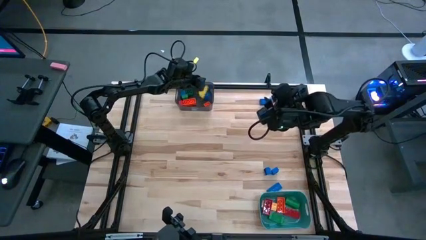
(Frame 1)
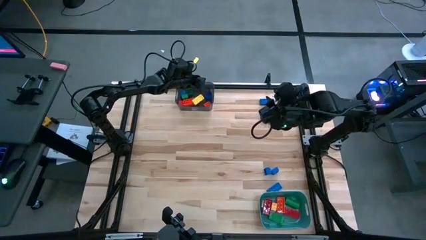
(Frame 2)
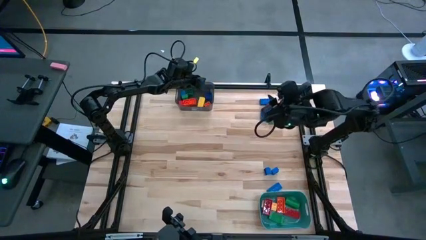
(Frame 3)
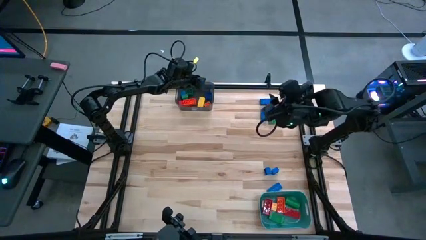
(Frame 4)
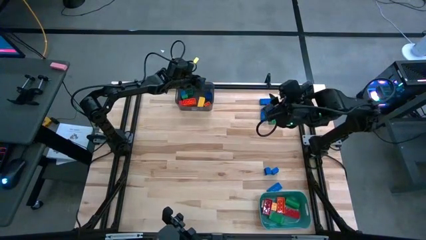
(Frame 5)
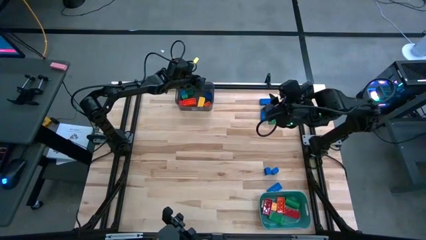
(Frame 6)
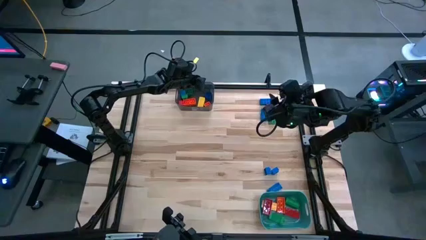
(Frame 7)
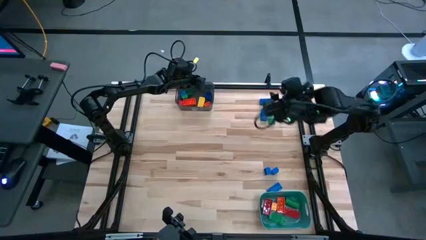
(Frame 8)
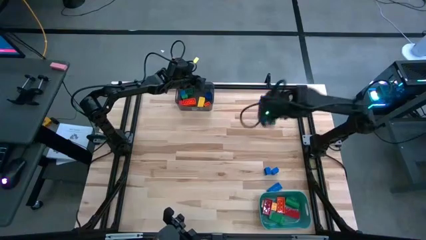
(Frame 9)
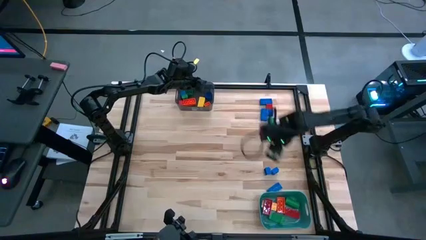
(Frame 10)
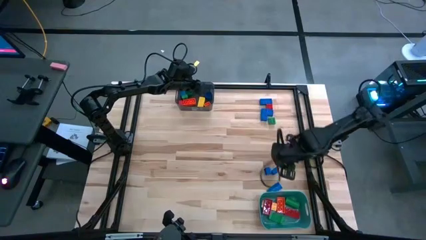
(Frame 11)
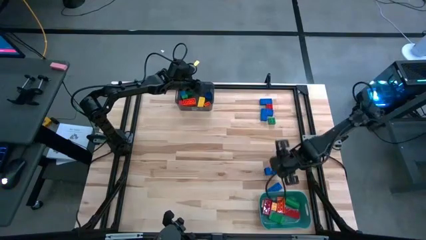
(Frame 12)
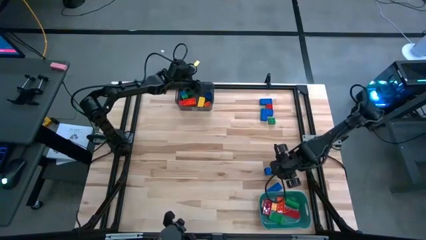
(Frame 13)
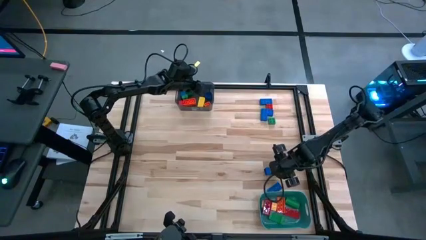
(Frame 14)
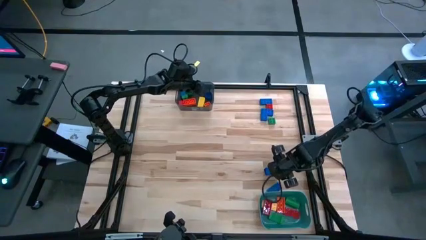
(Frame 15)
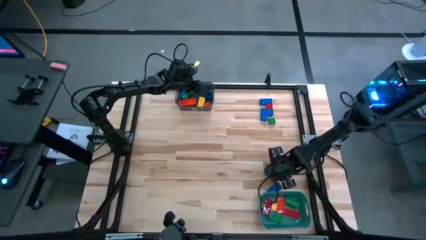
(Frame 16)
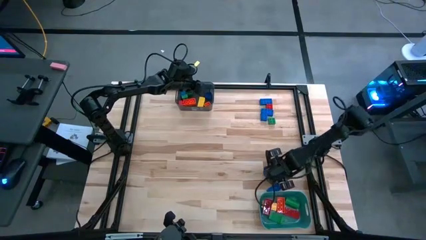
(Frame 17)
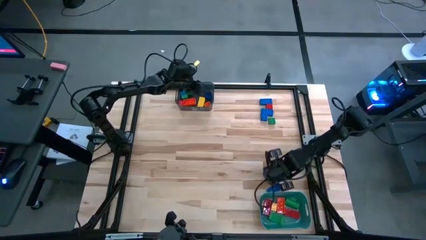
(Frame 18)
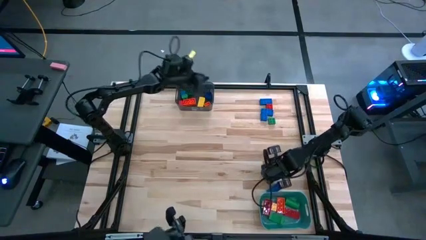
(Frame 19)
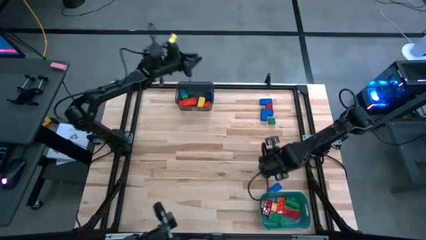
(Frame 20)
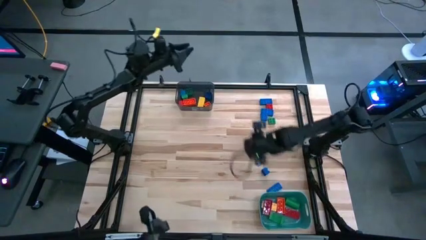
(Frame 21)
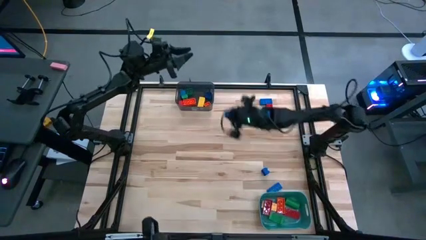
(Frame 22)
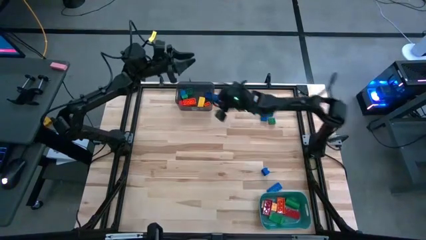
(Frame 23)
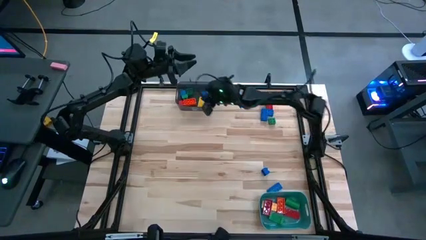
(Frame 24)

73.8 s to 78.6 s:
Task: Sort blocks by size
Put the blue game piece into the black bin

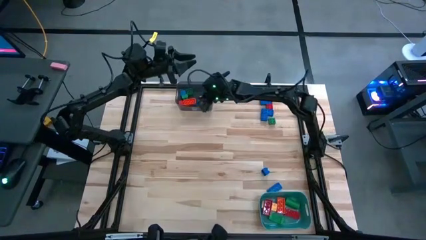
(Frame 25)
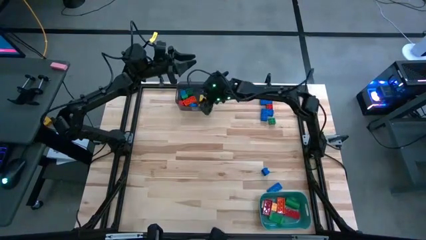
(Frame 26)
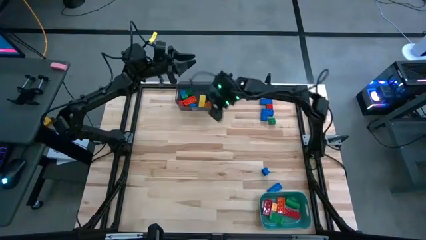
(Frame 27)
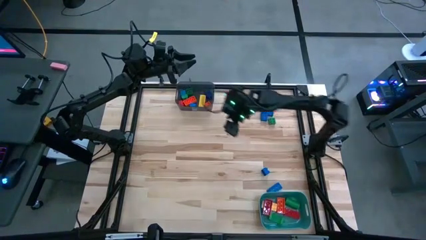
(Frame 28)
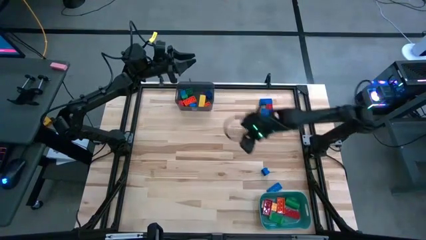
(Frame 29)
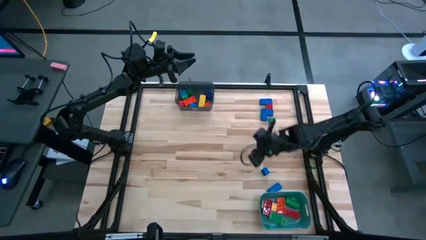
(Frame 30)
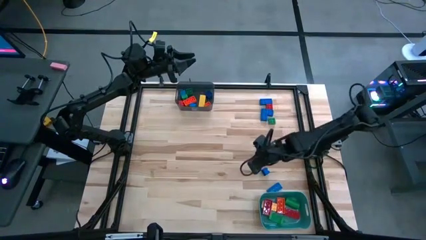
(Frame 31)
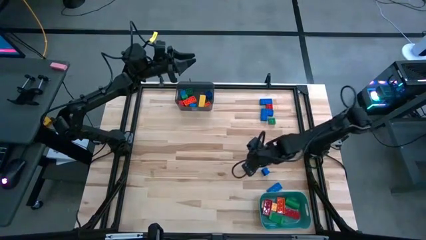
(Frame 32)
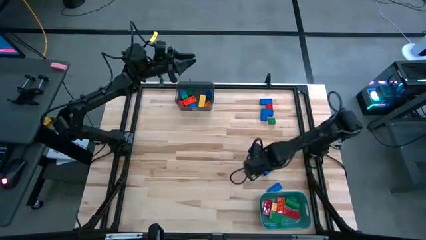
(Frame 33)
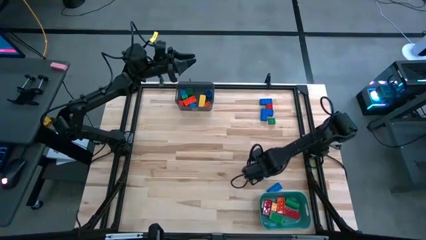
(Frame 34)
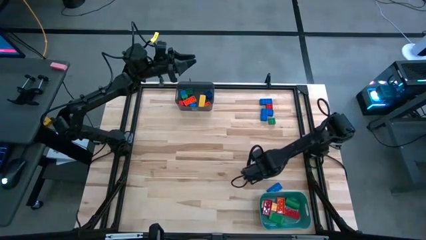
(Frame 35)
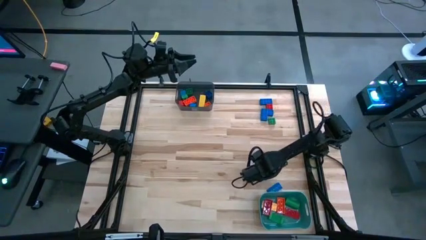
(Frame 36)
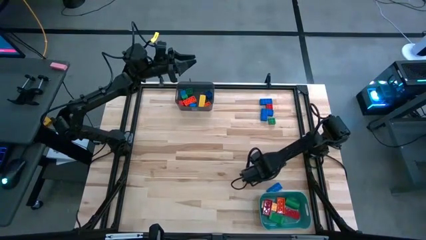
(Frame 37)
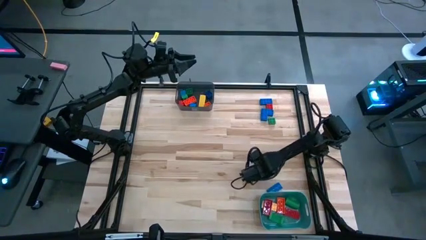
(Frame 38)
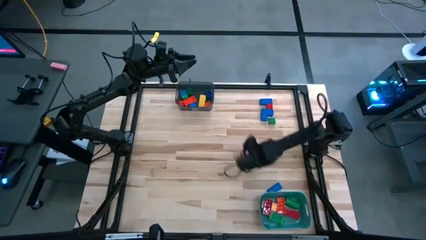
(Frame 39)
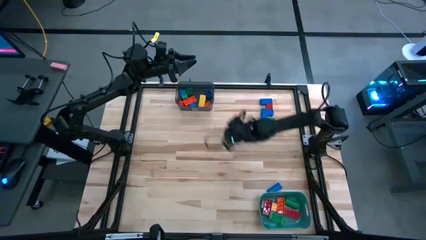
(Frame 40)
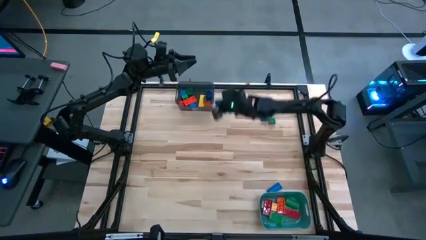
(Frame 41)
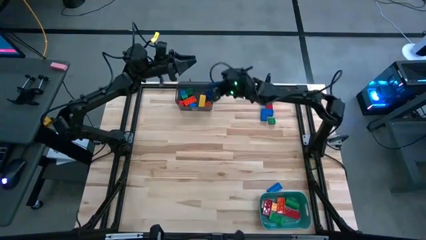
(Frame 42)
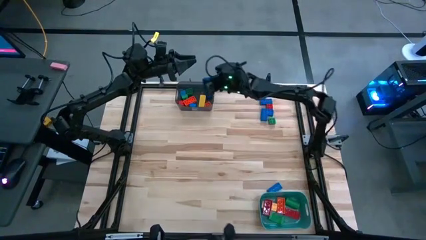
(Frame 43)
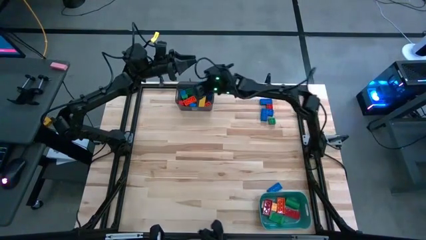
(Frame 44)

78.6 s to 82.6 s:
Put the blue game piece into the black bin

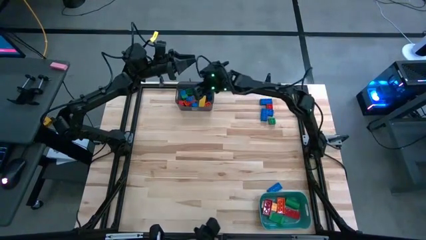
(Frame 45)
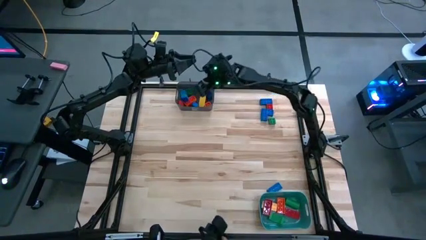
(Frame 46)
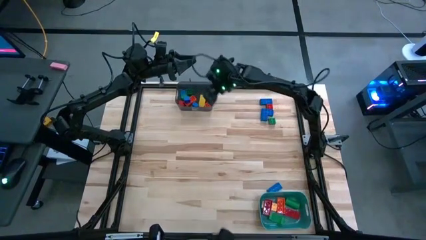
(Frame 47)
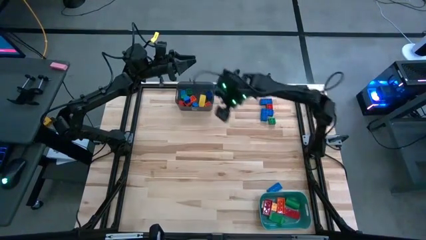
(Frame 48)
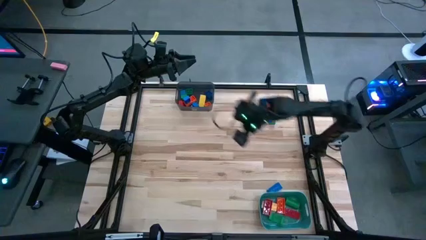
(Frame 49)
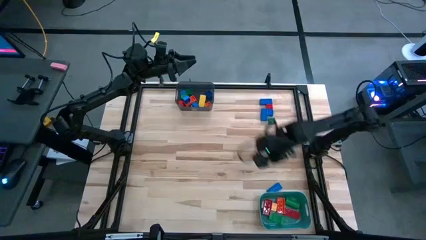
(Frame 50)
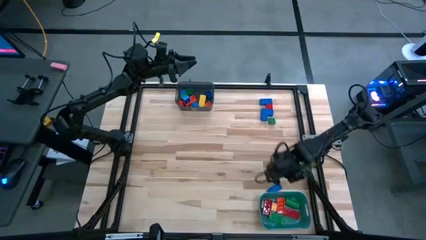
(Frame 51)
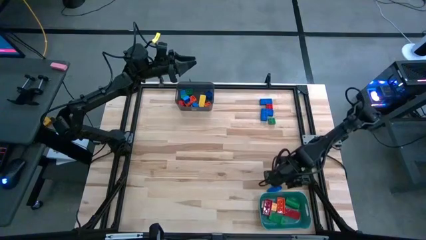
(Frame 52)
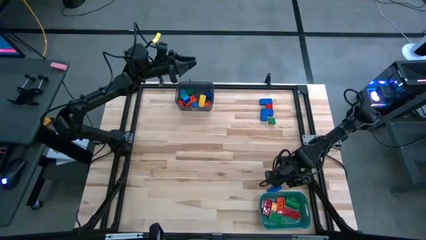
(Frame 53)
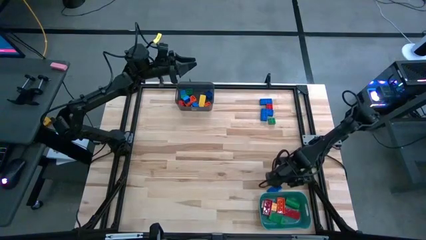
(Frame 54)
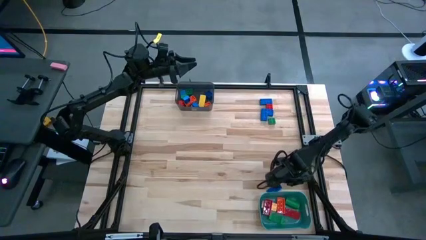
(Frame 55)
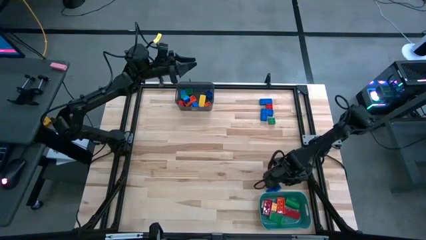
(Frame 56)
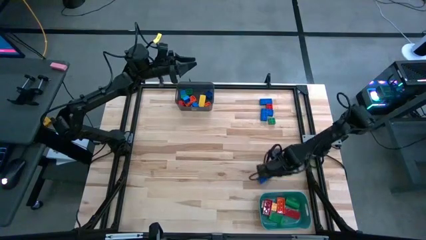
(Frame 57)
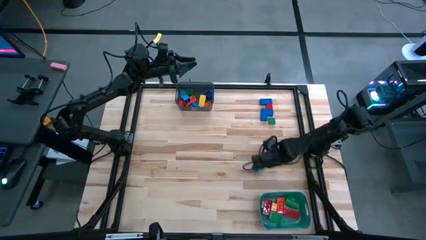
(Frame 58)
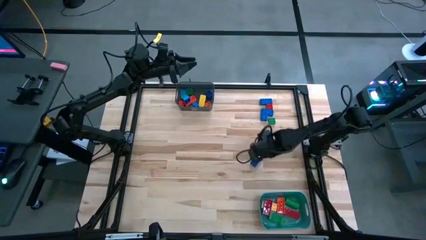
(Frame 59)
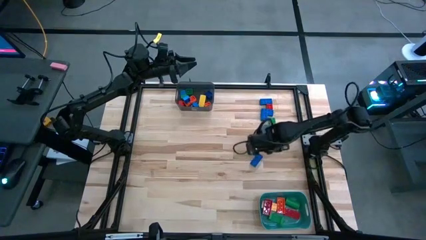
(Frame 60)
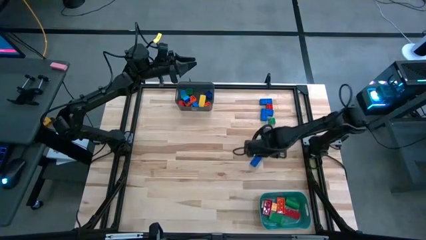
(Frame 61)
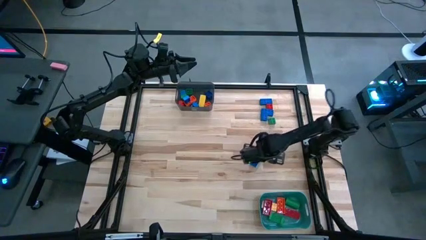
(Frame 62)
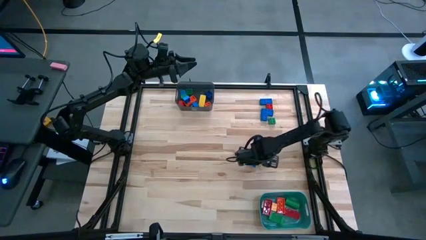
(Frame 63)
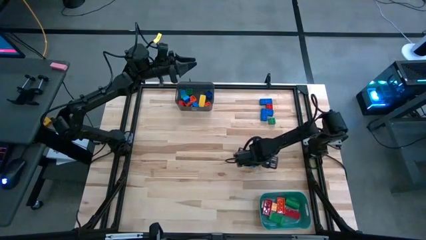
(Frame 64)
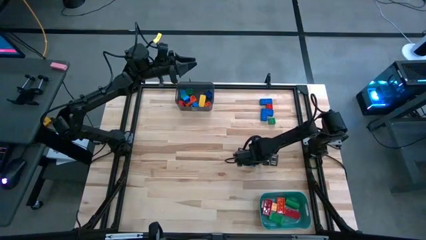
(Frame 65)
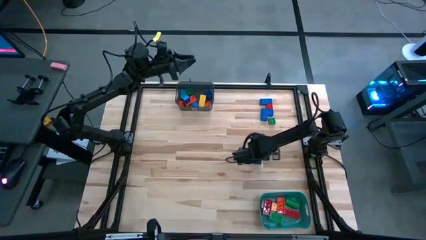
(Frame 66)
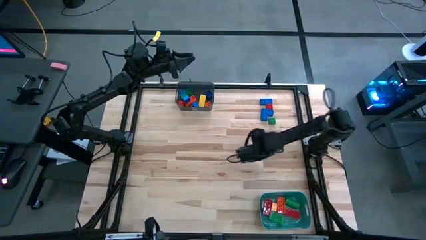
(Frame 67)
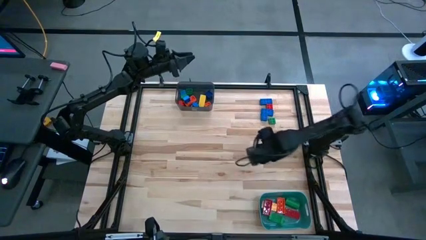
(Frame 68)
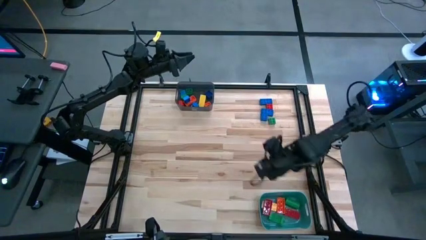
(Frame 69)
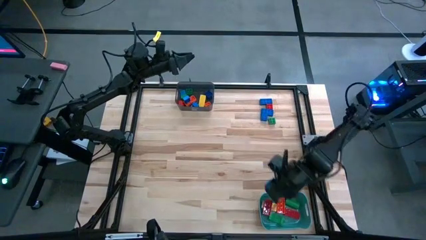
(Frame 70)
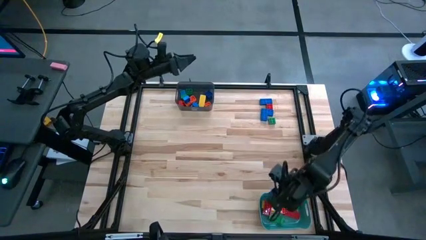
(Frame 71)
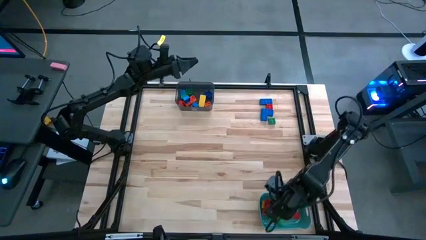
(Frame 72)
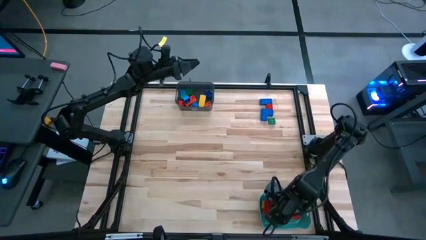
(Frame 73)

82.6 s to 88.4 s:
Put the blue game piece into the green bin
